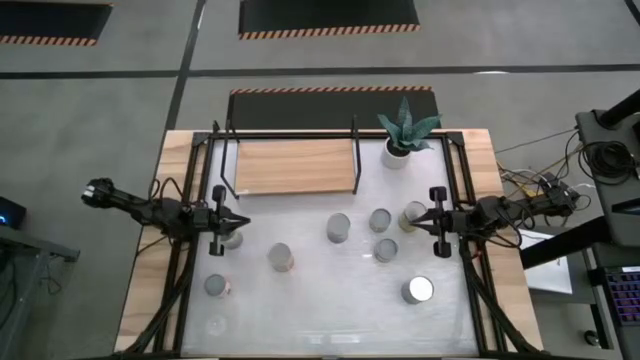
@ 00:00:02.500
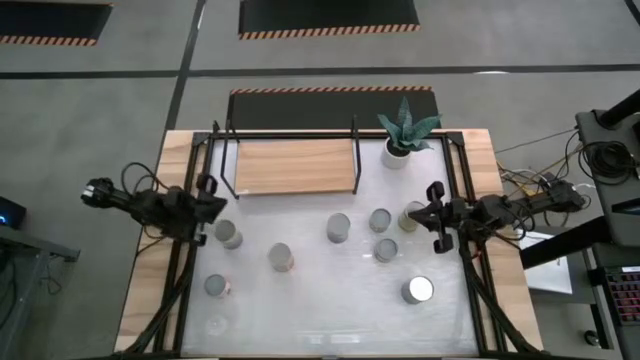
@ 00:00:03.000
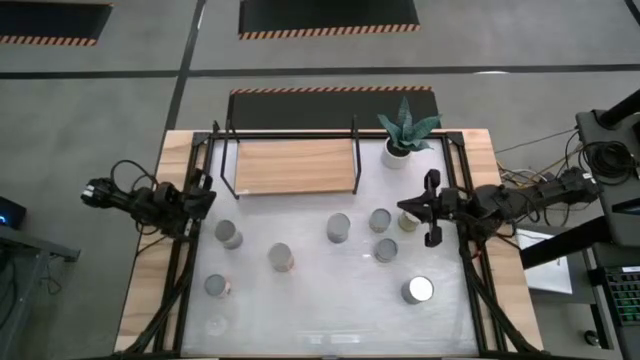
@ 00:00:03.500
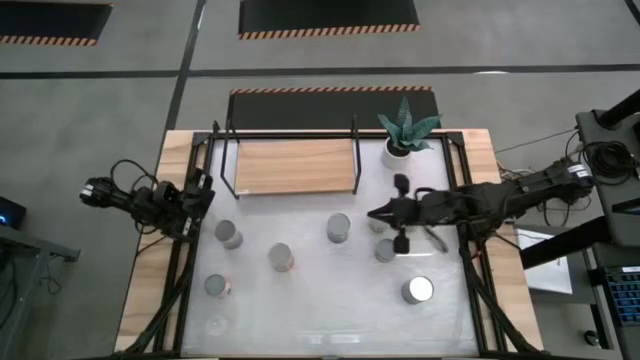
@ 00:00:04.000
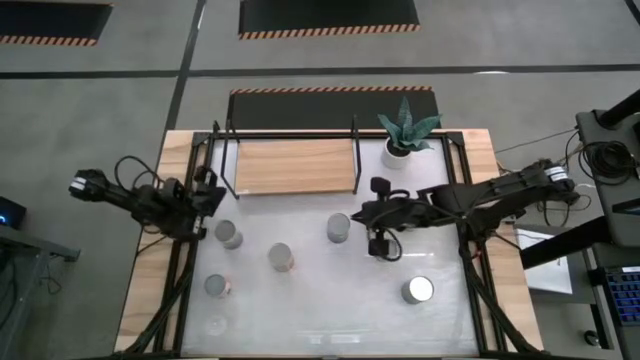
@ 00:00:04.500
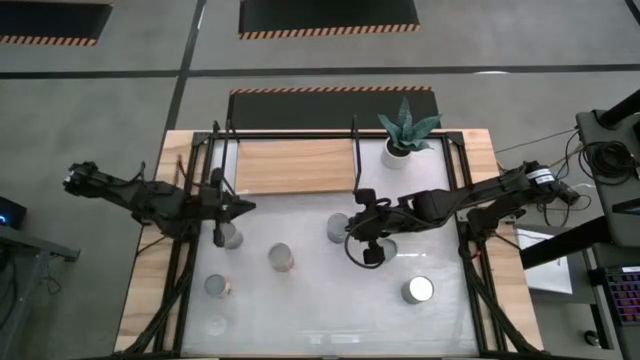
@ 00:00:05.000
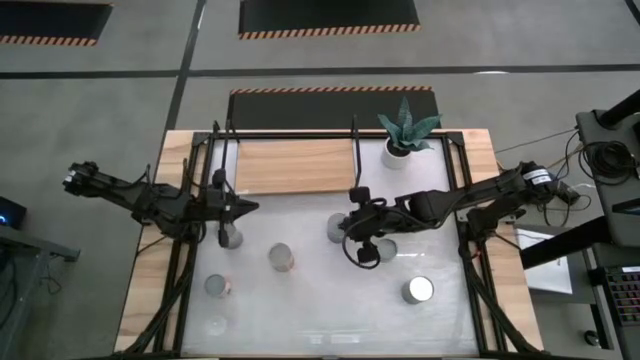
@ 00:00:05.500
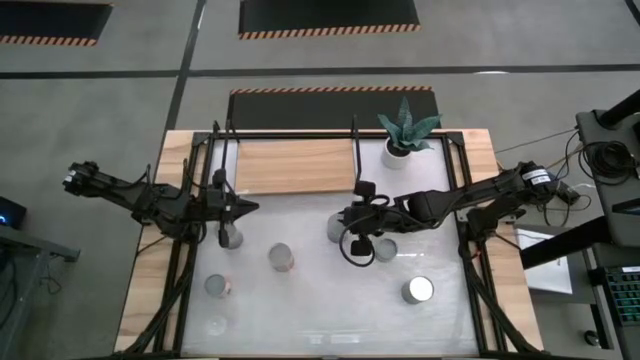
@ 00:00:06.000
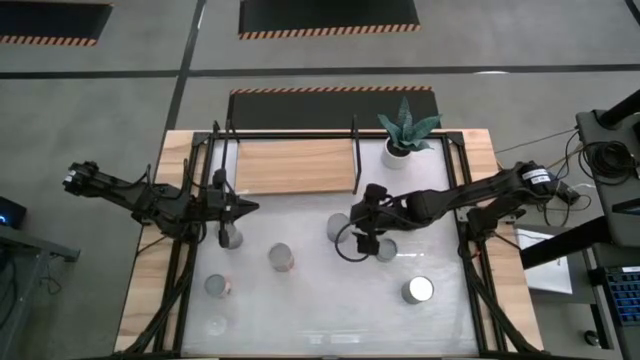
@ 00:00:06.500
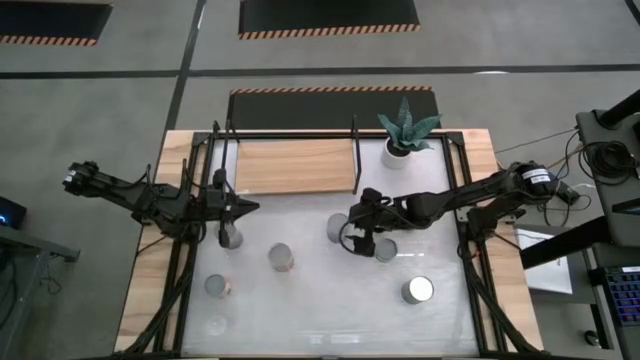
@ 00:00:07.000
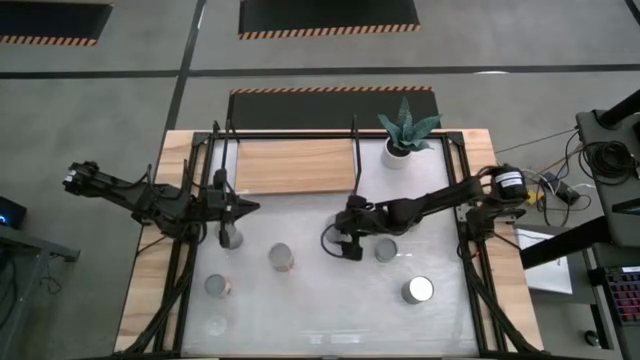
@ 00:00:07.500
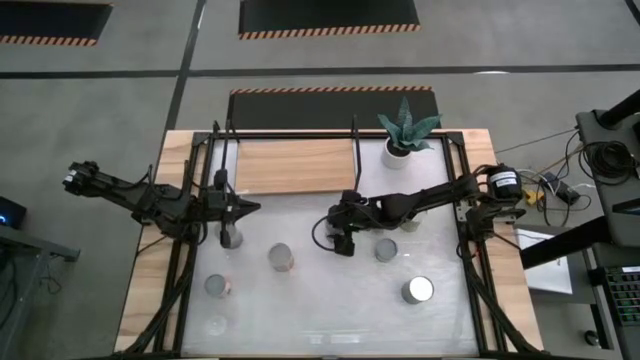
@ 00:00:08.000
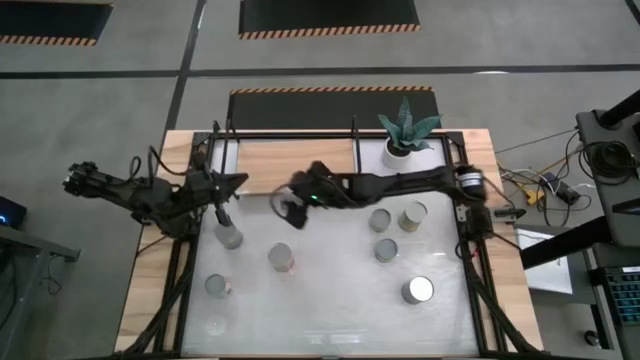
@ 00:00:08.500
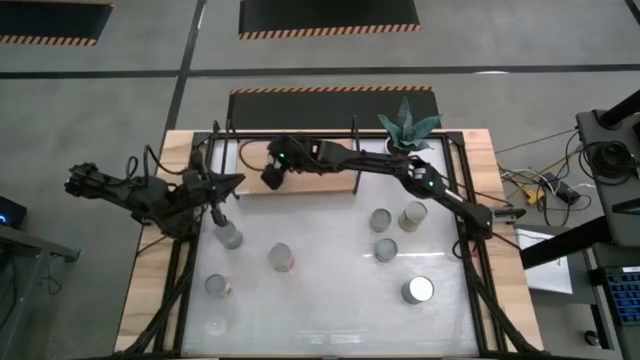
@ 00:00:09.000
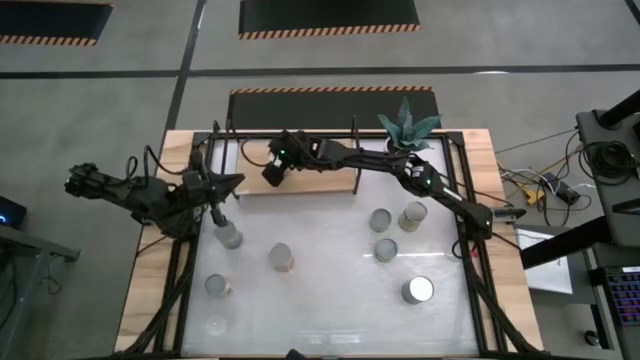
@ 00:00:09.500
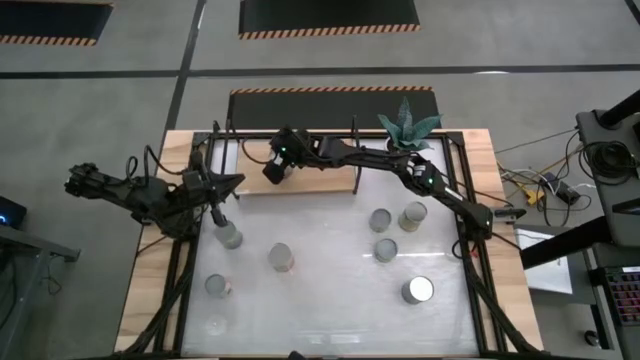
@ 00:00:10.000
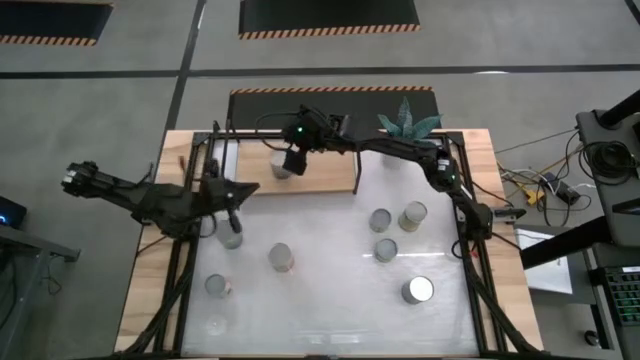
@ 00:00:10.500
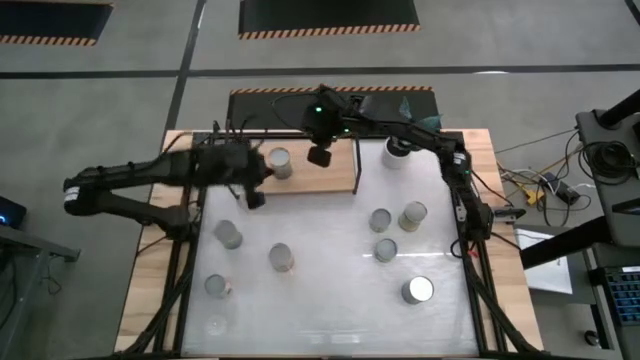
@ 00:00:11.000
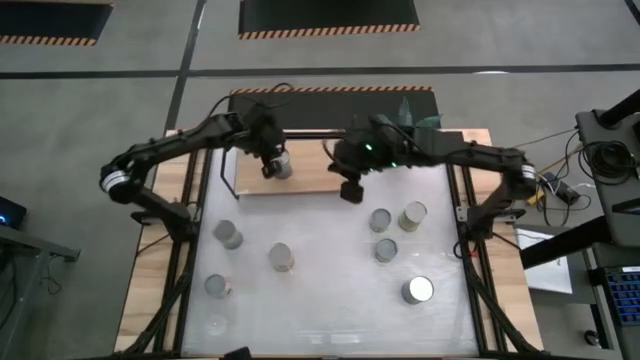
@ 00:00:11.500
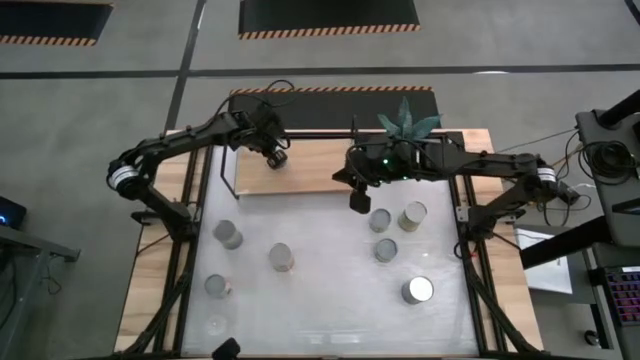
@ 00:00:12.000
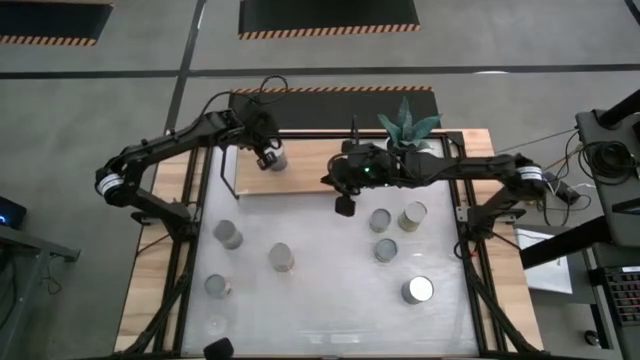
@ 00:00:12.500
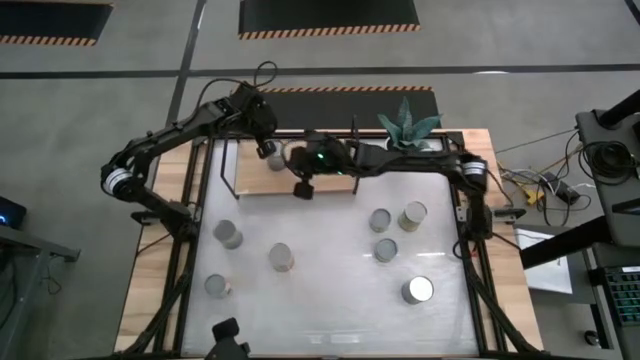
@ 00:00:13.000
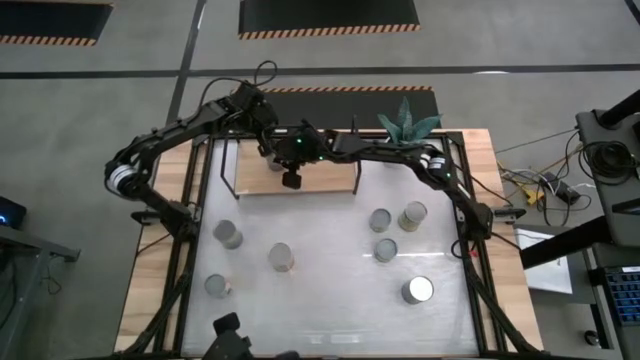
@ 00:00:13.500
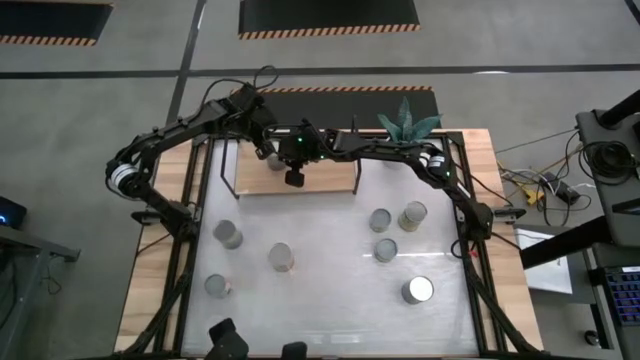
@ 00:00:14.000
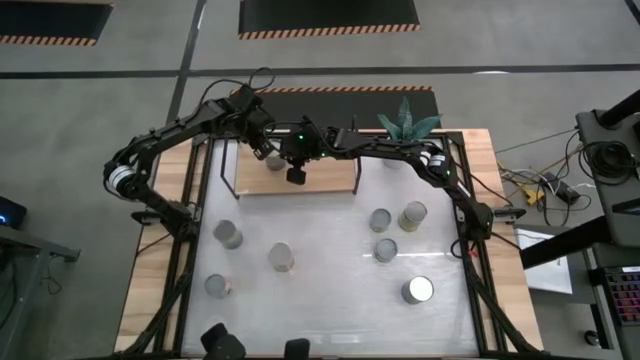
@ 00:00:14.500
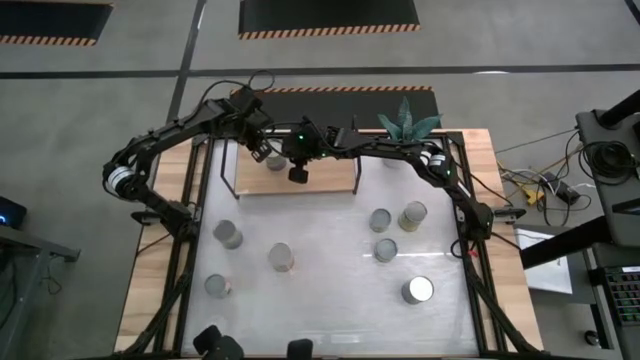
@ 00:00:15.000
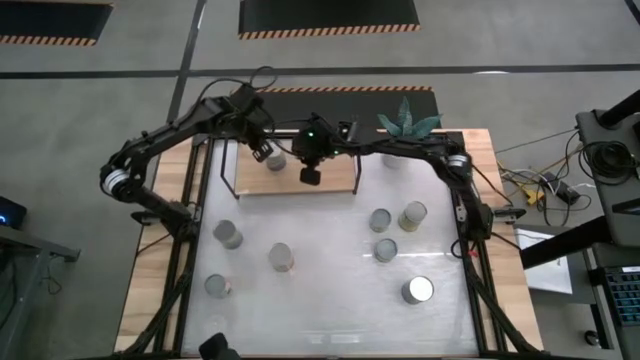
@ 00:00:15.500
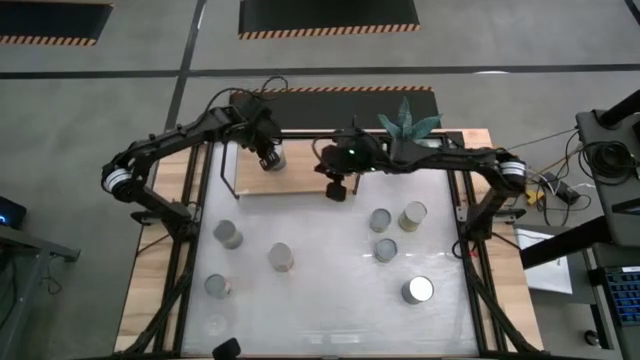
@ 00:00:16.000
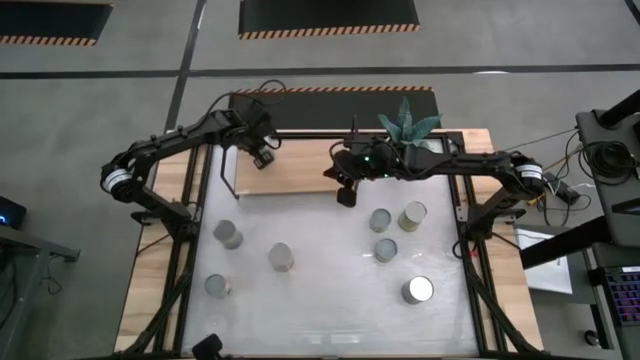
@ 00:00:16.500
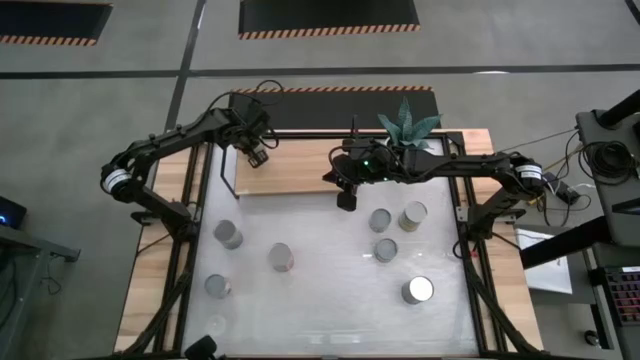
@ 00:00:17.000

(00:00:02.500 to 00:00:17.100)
Task: Pick and place cans onto a shelf
Put the right canned peas on the shelf

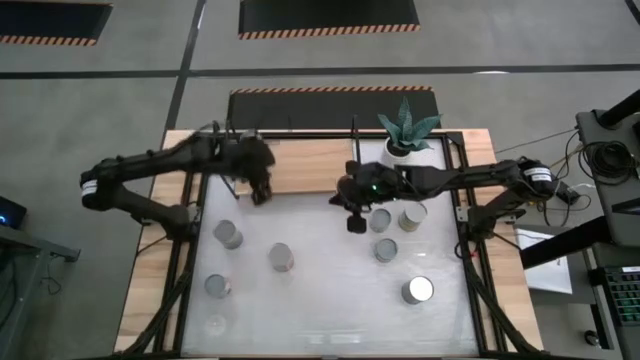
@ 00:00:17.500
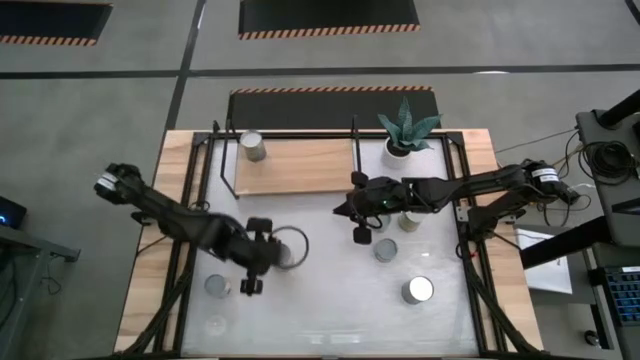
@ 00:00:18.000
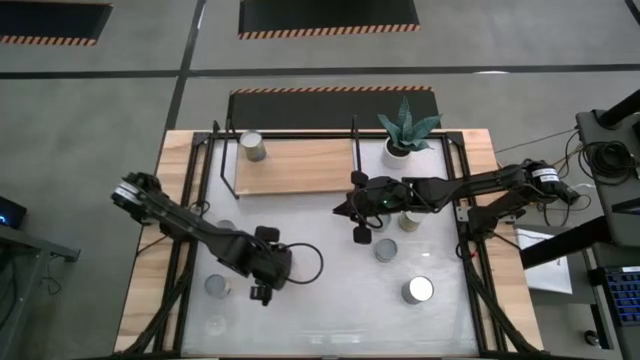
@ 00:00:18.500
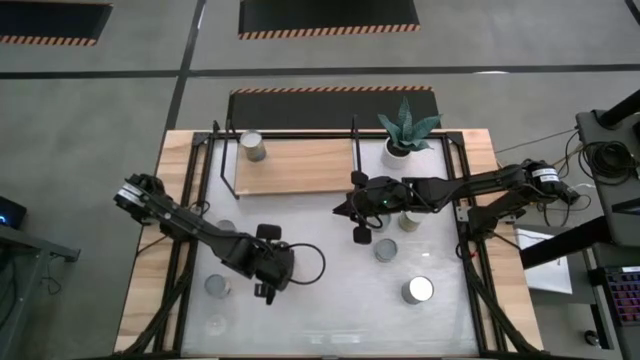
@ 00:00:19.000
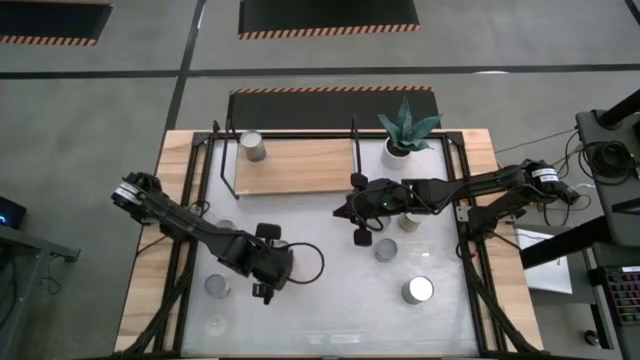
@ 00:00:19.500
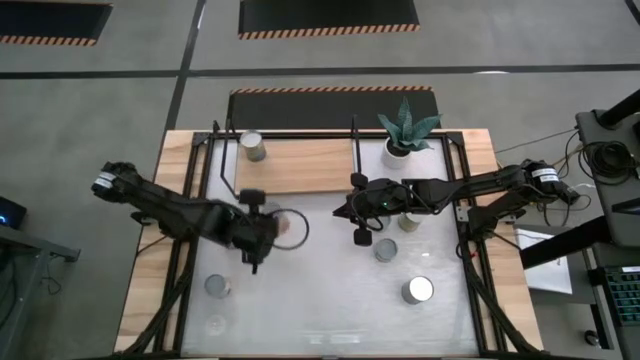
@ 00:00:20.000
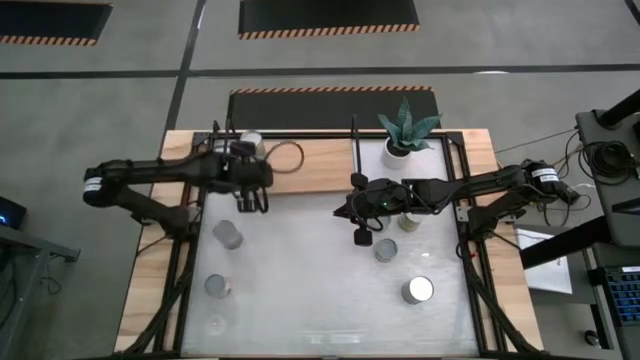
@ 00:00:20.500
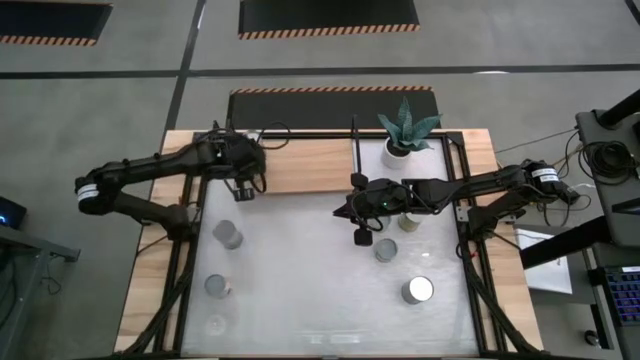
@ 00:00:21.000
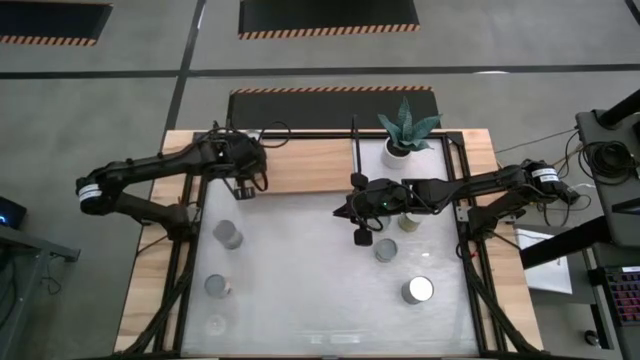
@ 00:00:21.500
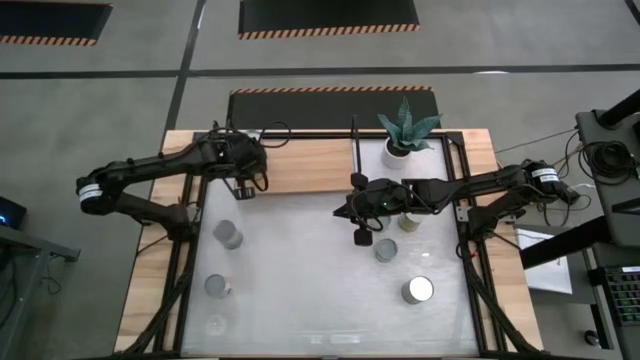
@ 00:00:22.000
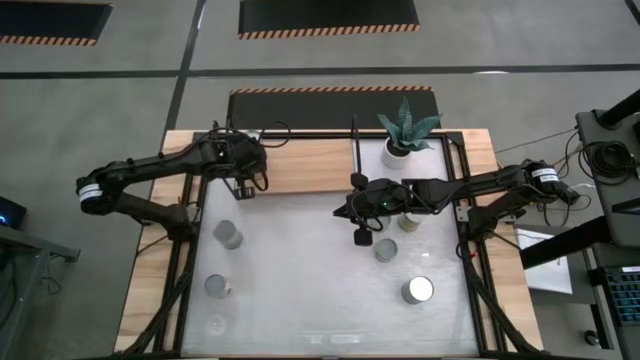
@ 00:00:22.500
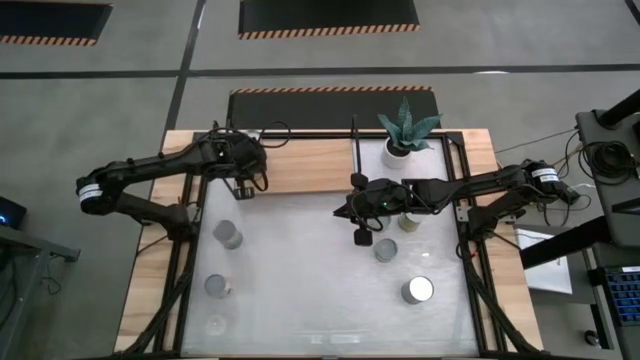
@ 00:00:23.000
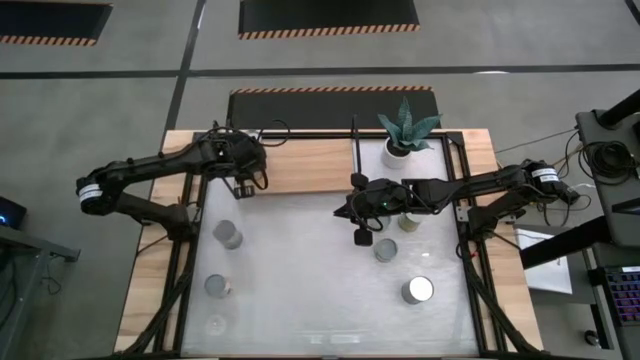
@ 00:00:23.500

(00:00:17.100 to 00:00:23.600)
Put the canned pineapple on the shelf
